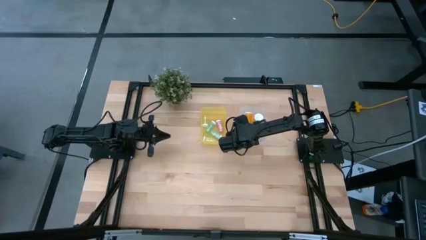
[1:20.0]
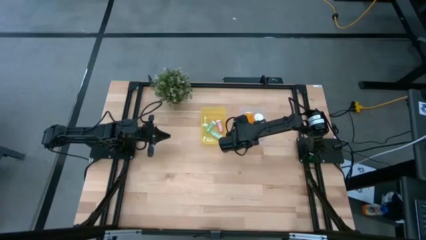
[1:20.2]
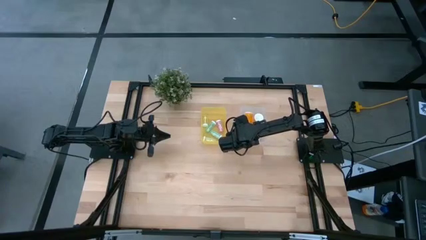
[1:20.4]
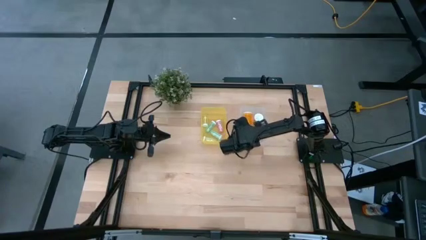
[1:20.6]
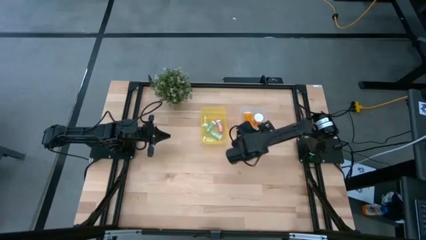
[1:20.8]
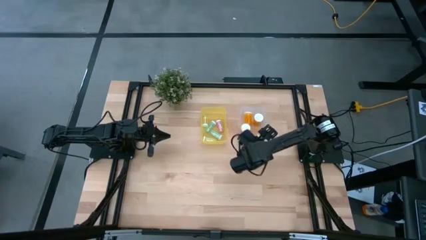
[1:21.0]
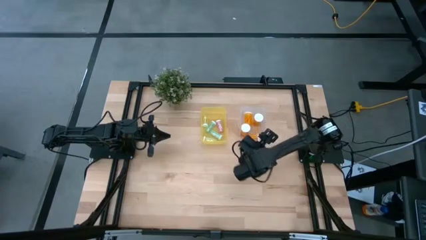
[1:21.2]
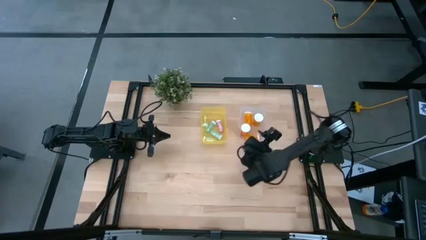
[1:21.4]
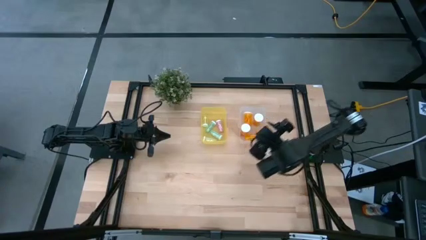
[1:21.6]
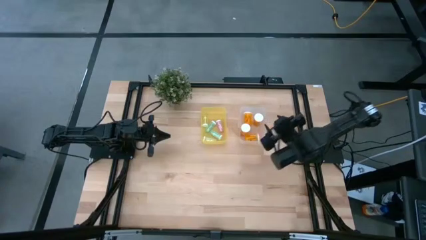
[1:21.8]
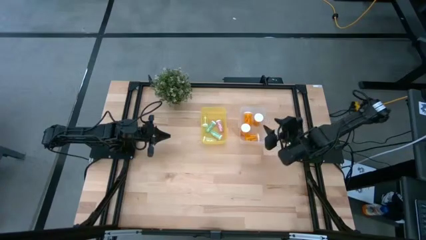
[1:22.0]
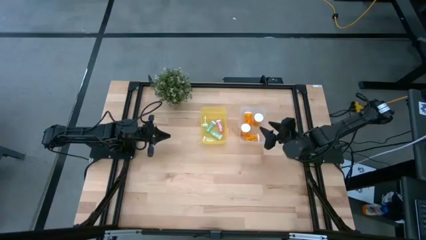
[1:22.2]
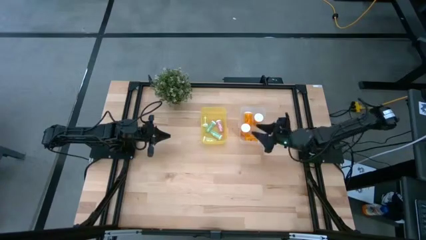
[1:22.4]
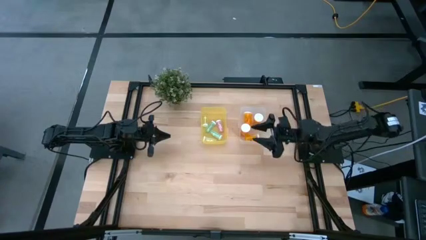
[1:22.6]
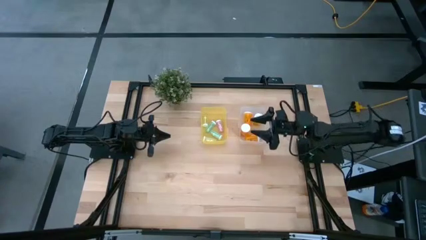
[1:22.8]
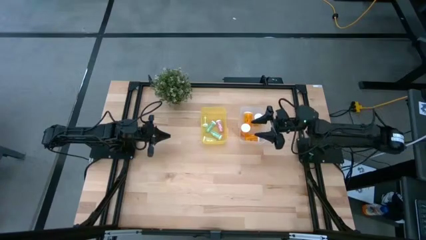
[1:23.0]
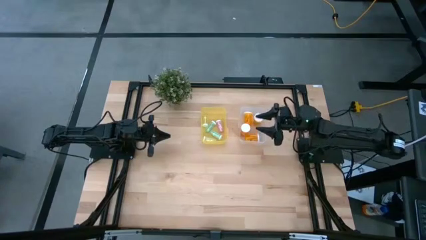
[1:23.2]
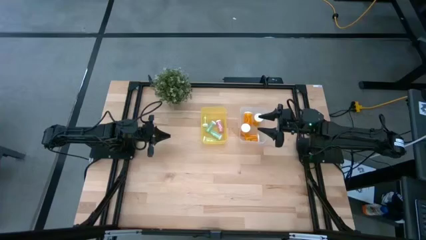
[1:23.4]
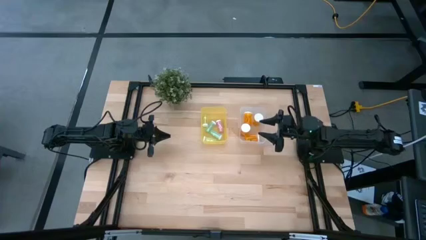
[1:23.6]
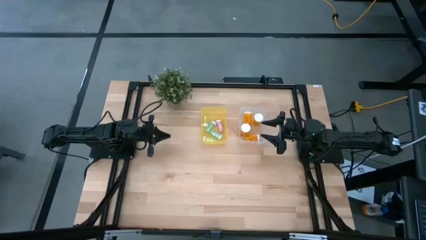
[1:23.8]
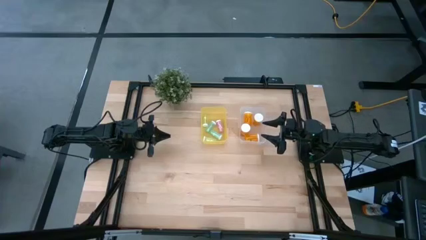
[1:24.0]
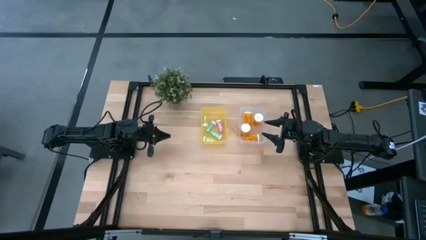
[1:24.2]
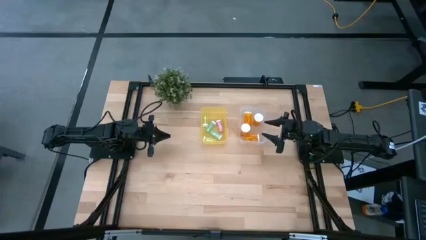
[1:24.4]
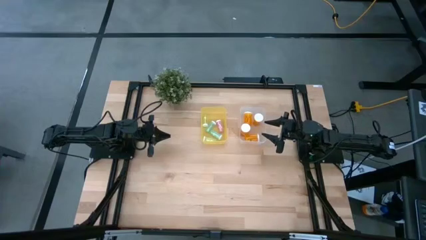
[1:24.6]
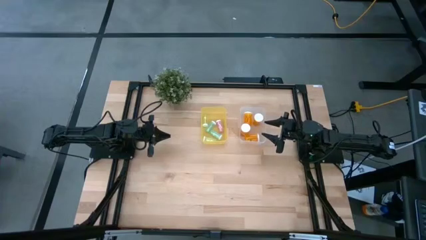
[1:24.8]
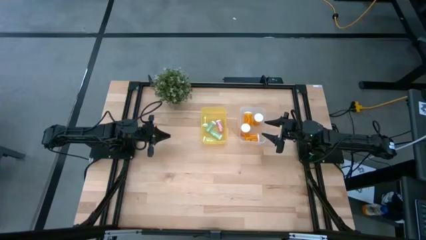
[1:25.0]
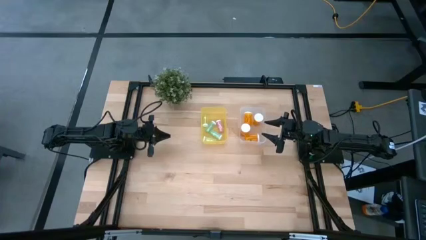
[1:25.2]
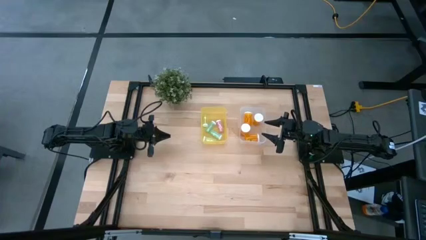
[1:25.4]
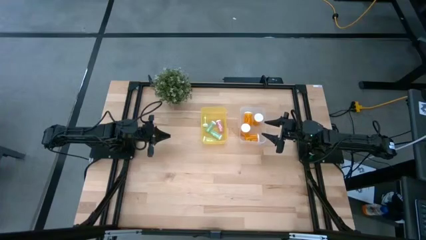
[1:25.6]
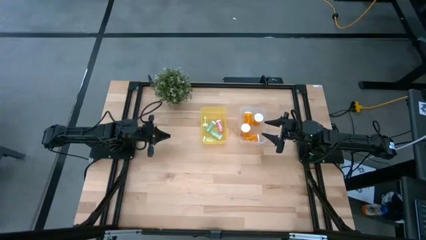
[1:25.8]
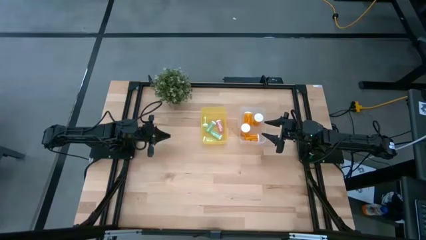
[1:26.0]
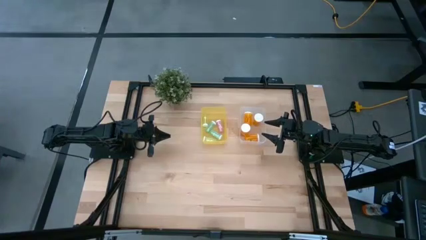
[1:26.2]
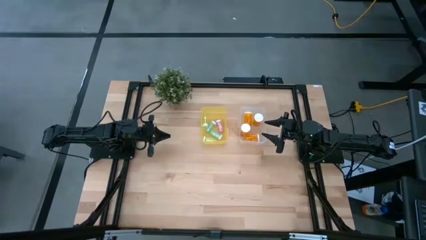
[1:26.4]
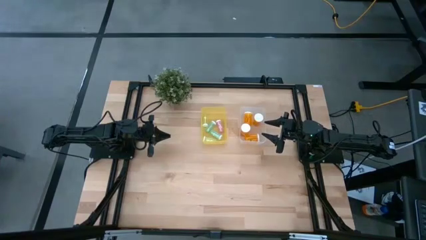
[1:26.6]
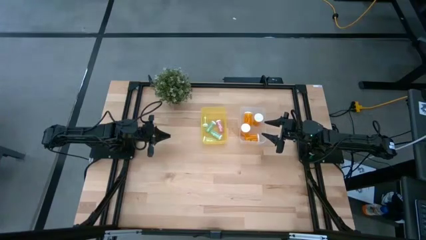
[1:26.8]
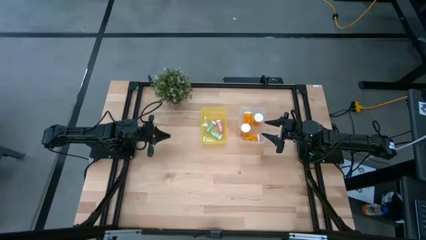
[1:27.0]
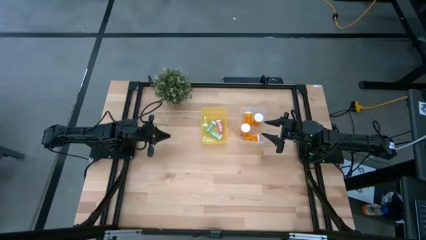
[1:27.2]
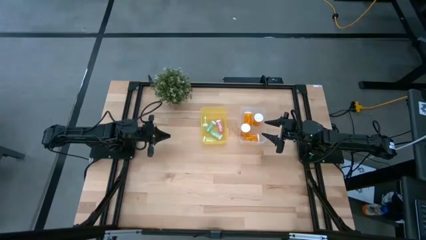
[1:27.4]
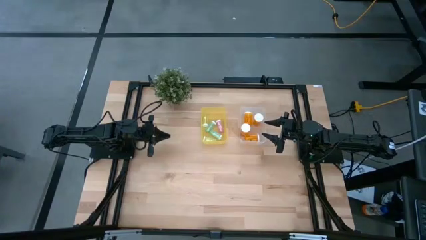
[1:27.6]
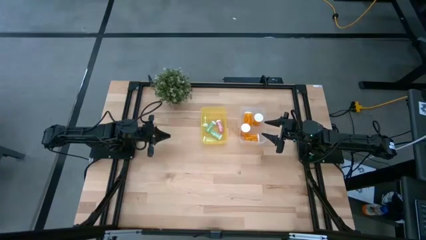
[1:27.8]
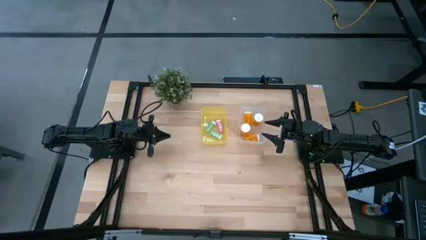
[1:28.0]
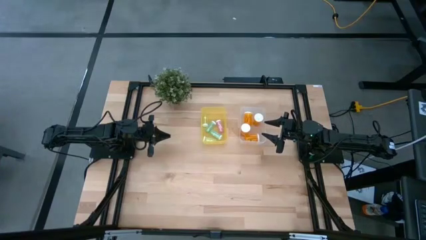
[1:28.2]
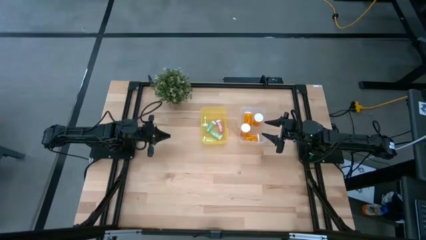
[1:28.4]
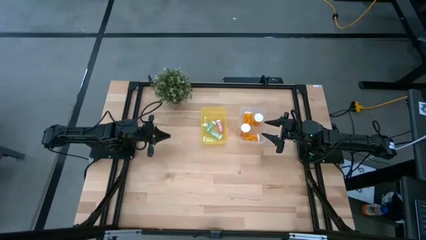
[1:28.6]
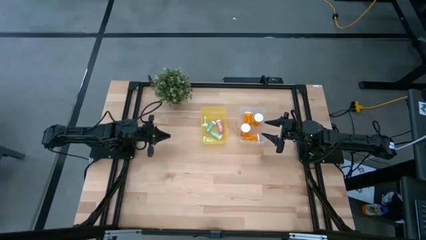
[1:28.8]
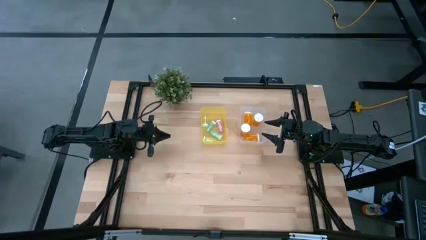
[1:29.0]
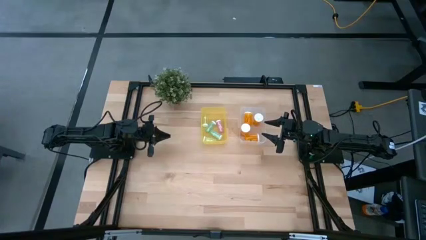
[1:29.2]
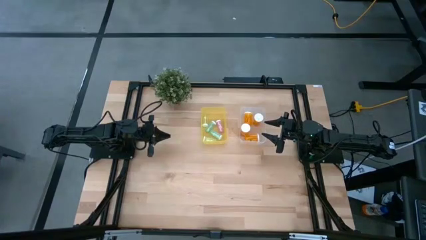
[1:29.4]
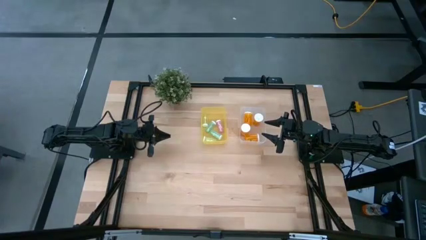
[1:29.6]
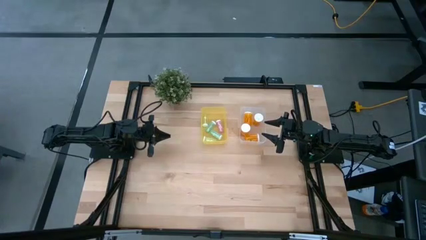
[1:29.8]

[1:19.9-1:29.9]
Task: Pick and place medicine bottles into bin by pill shape (circle, oval)
Return to Home Position
